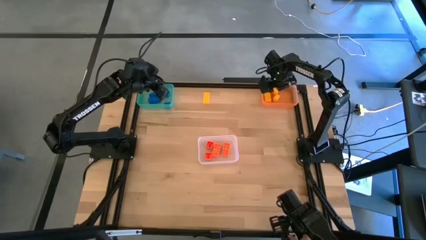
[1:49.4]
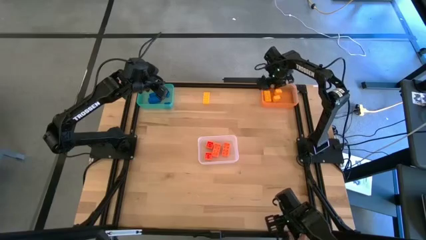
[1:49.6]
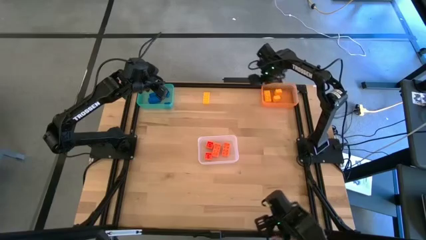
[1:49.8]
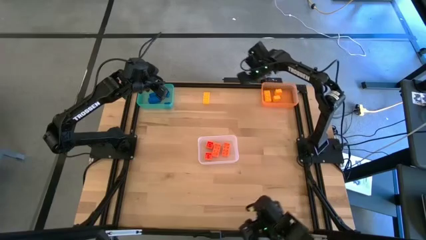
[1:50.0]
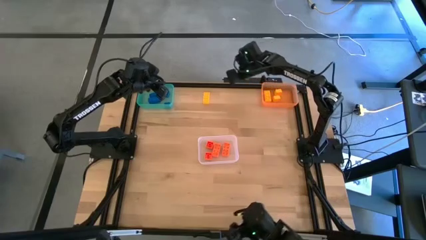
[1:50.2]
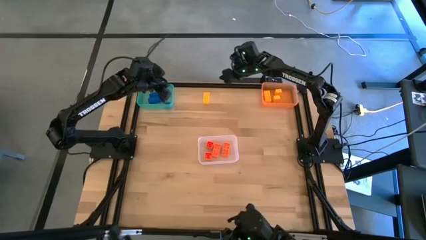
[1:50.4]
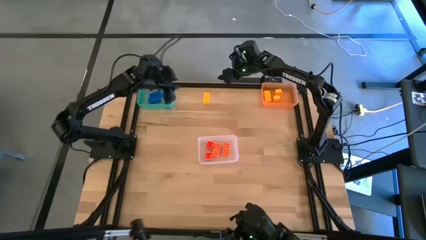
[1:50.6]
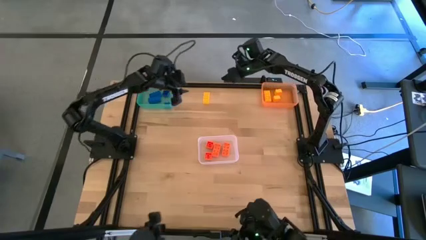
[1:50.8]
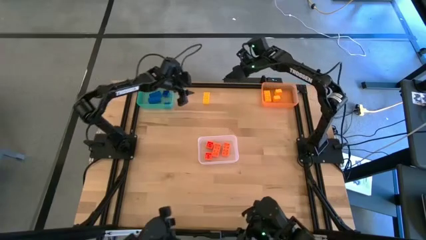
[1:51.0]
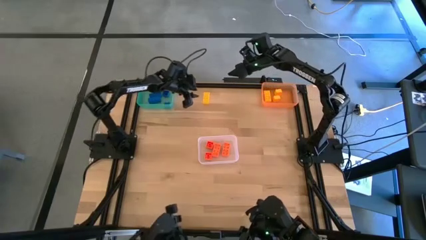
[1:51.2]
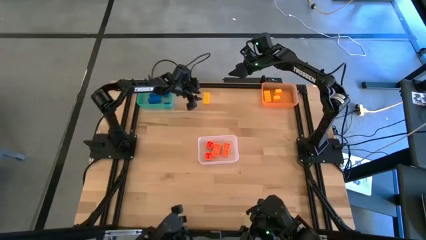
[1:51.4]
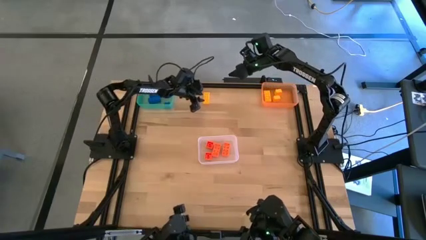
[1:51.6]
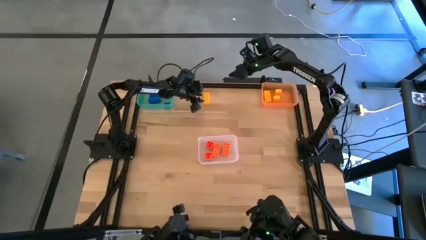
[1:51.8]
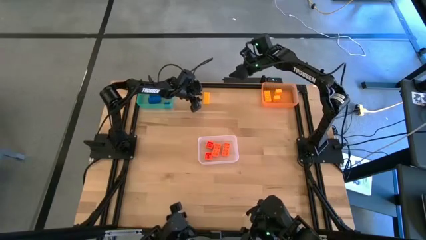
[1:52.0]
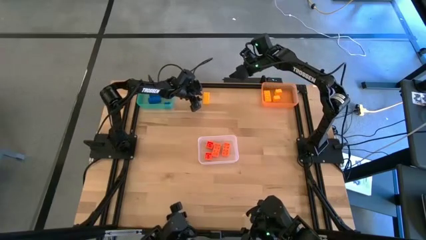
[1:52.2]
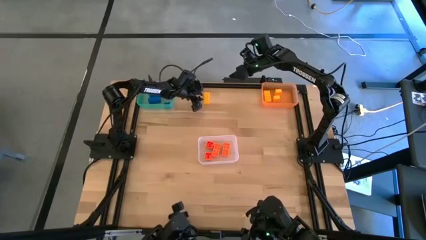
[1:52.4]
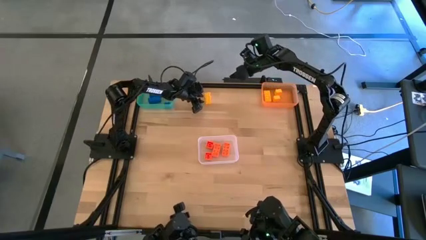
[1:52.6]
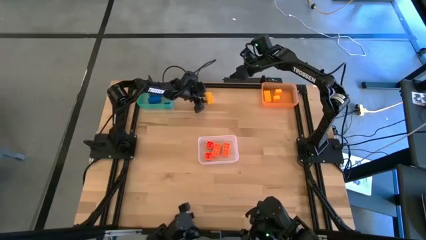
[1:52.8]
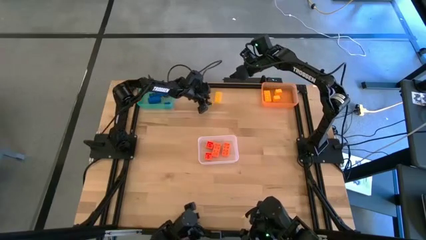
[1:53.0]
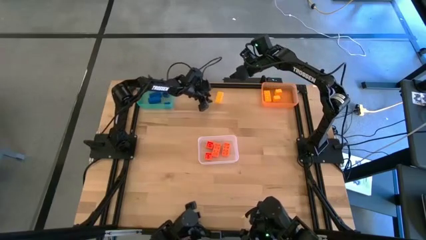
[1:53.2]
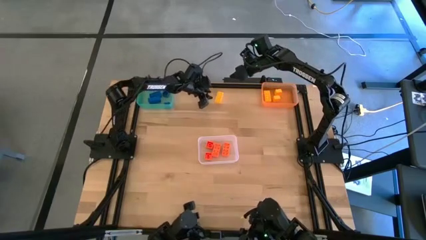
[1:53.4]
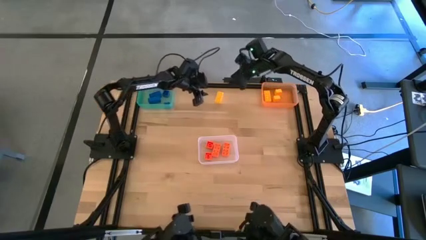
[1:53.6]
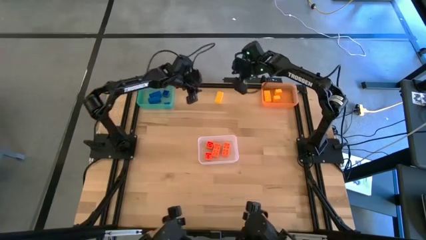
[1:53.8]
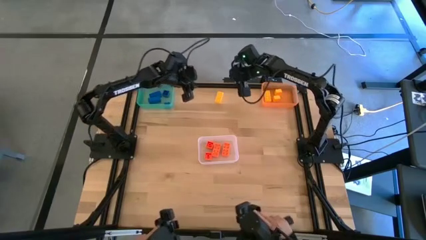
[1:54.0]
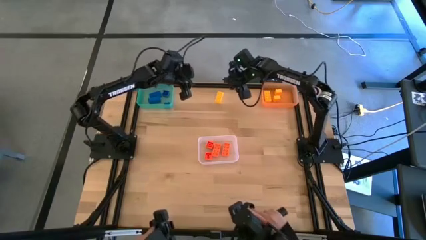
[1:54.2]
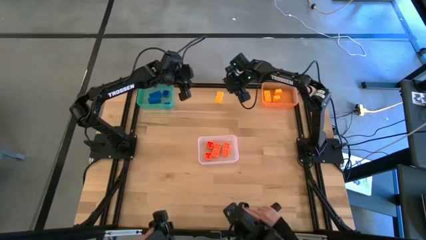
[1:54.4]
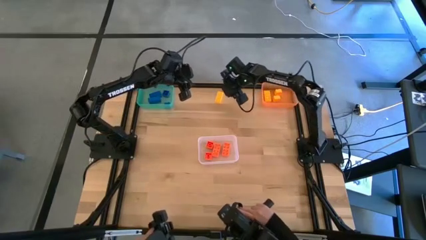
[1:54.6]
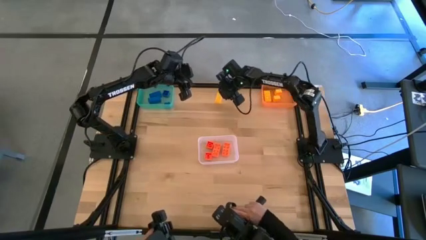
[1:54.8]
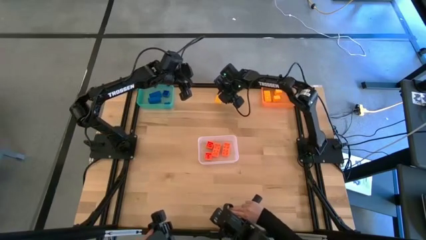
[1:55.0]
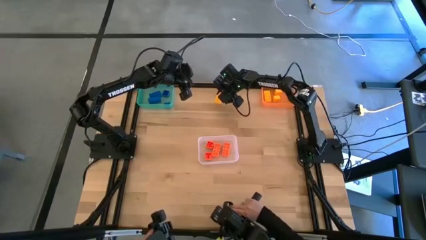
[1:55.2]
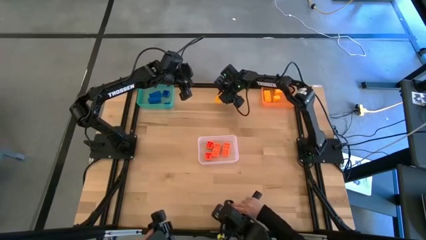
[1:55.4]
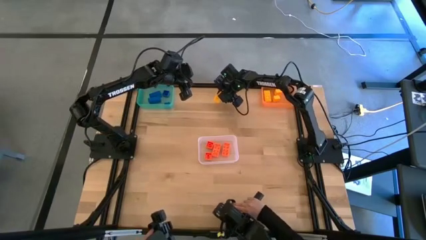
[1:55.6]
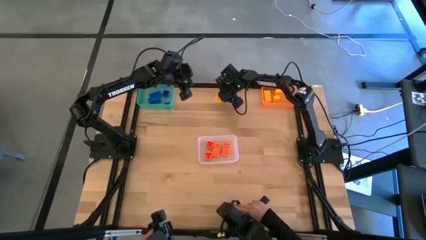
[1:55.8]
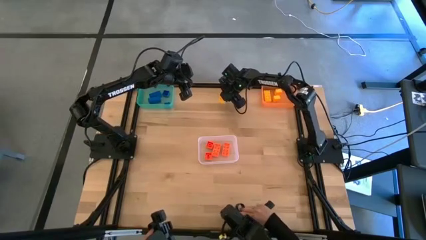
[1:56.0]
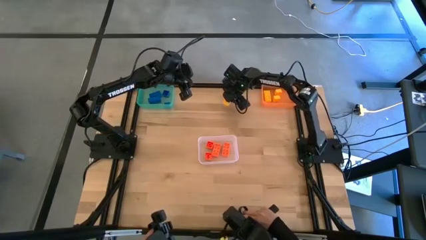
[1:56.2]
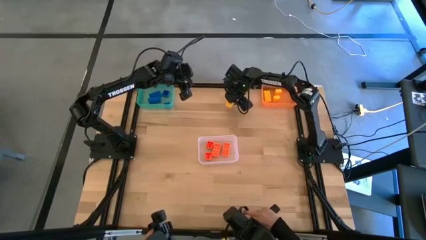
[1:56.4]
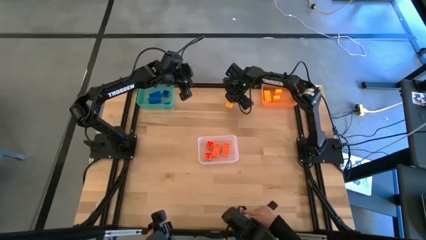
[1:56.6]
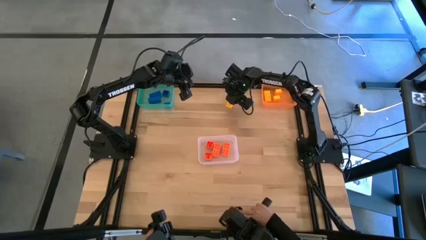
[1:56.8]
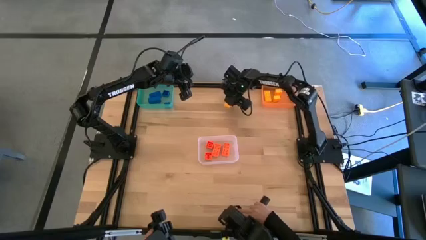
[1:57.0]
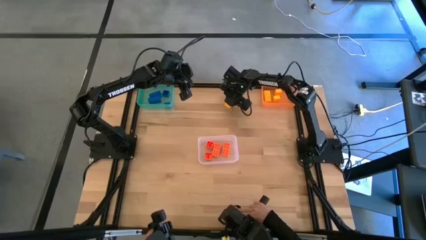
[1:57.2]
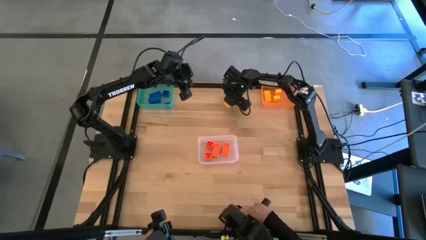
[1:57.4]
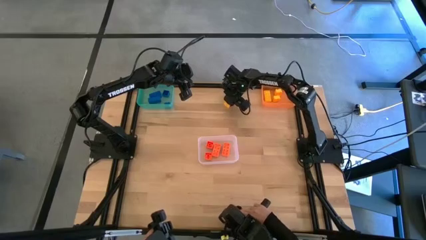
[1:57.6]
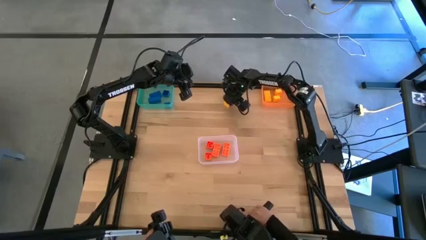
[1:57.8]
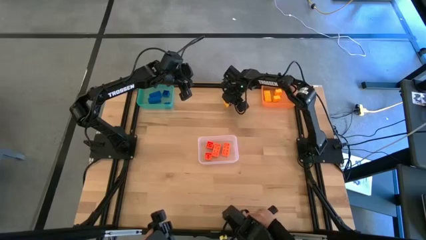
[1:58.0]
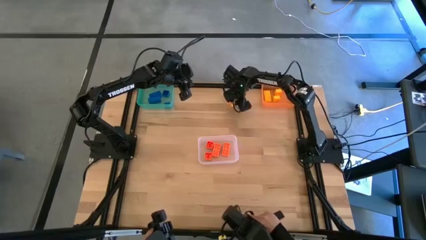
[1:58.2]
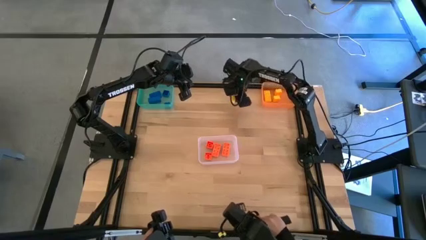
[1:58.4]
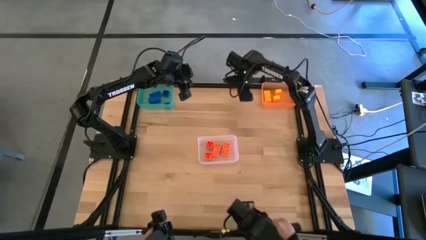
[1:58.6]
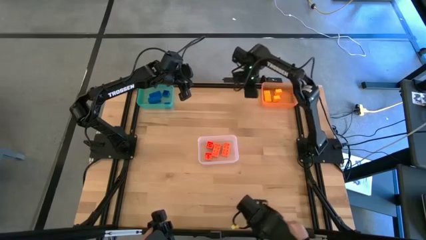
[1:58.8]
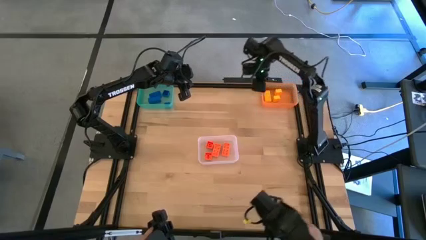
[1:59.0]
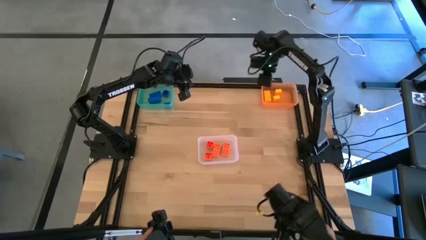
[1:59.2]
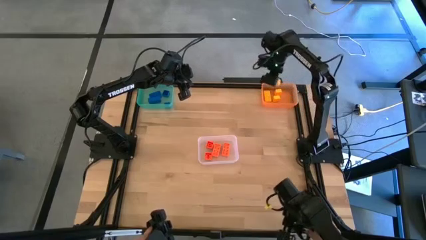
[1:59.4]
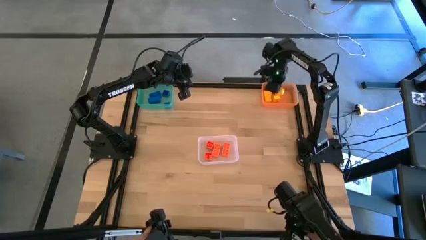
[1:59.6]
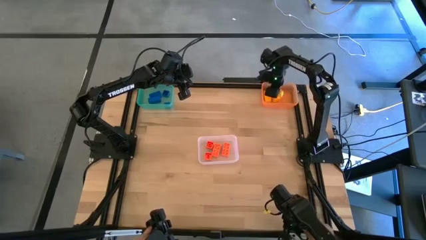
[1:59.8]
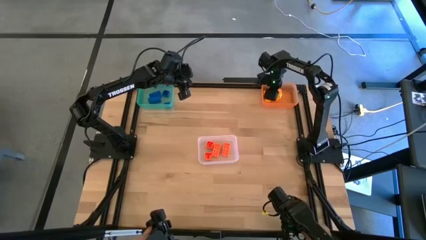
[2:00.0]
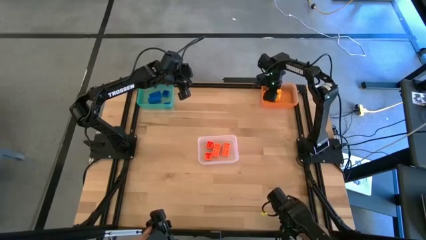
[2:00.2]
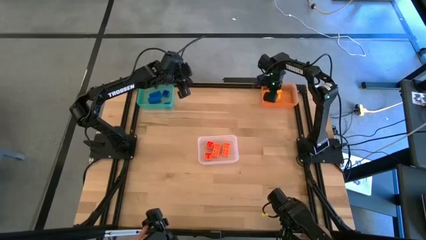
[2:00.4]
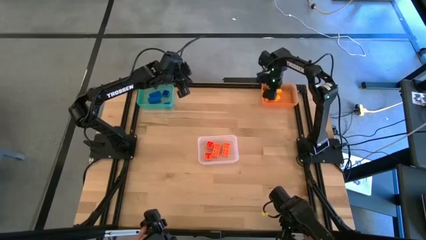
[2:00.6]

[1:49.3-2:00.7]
Task: Sort & place blocks by color
Put the yellow game piece into the orange bin

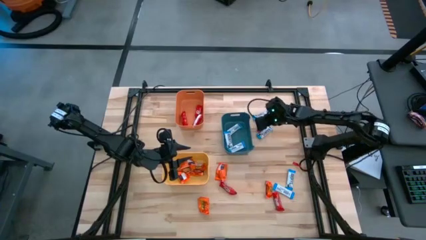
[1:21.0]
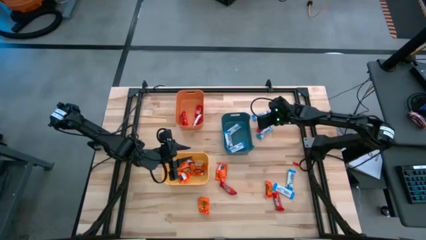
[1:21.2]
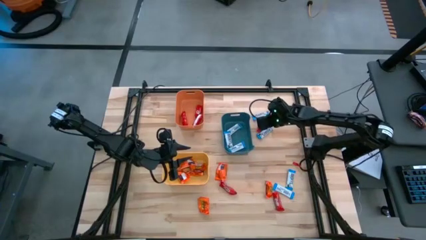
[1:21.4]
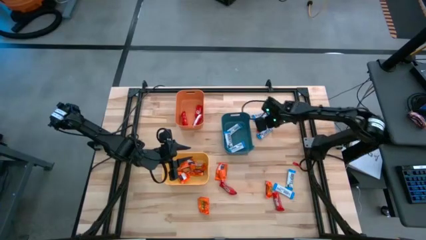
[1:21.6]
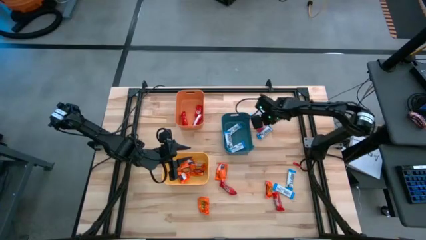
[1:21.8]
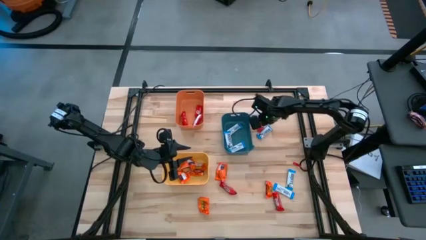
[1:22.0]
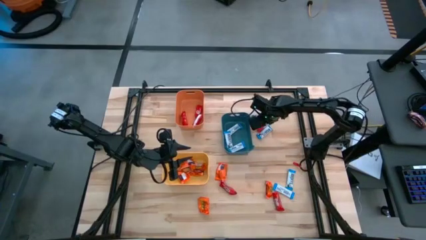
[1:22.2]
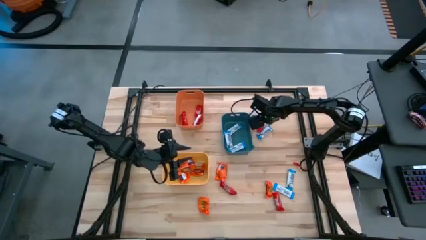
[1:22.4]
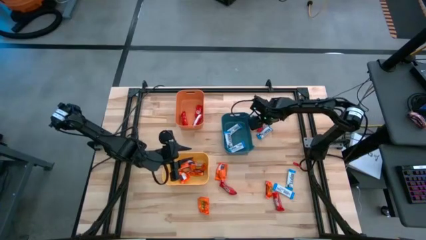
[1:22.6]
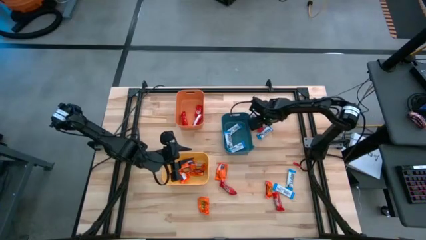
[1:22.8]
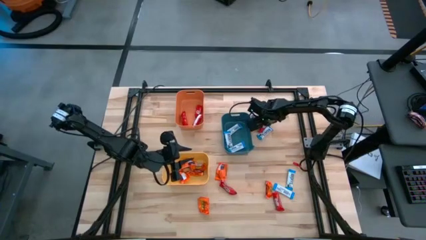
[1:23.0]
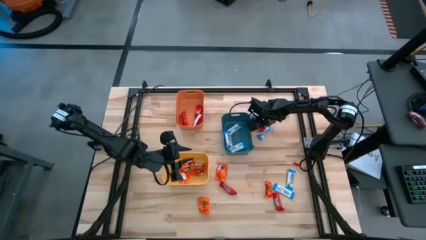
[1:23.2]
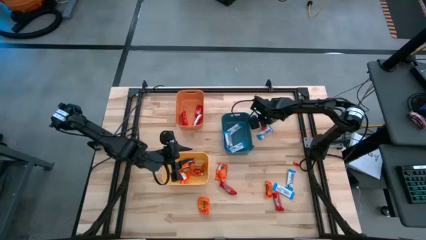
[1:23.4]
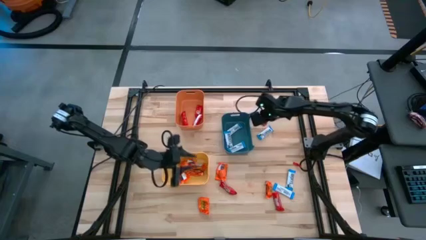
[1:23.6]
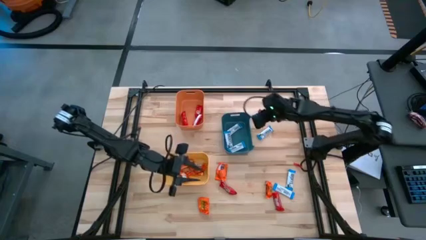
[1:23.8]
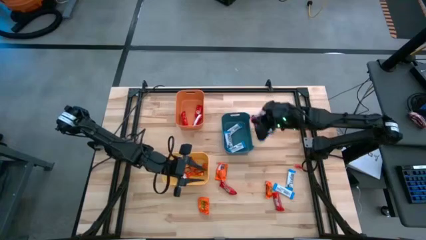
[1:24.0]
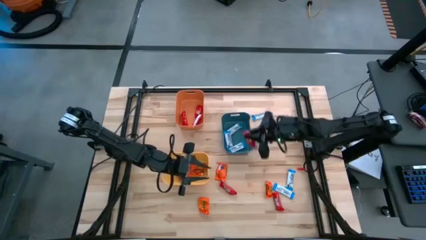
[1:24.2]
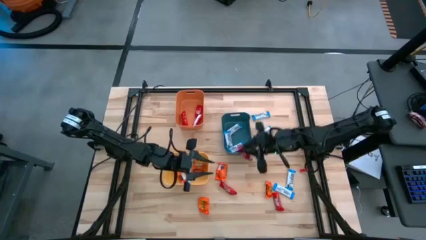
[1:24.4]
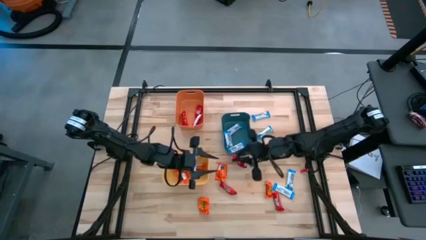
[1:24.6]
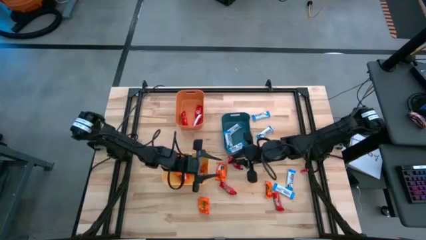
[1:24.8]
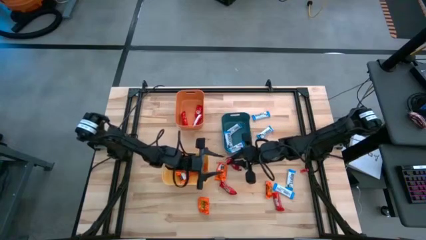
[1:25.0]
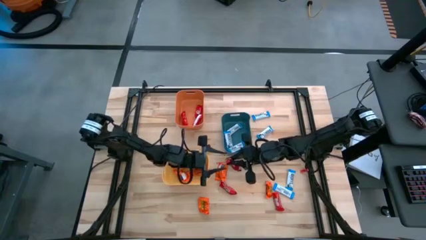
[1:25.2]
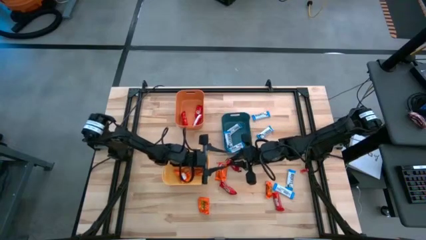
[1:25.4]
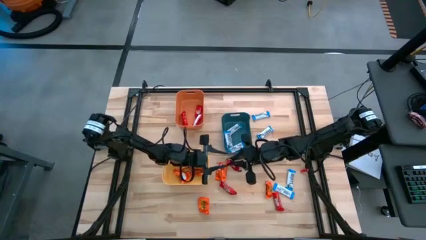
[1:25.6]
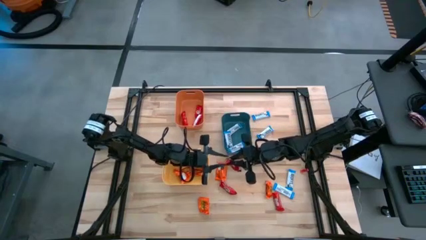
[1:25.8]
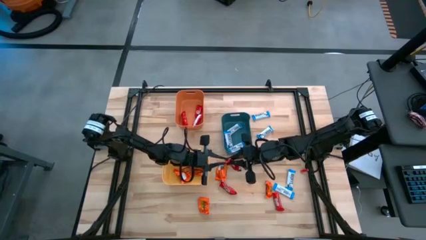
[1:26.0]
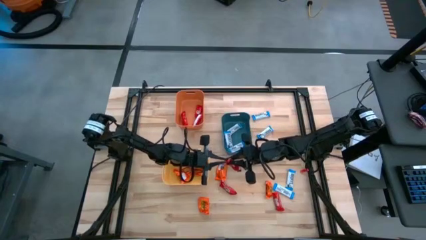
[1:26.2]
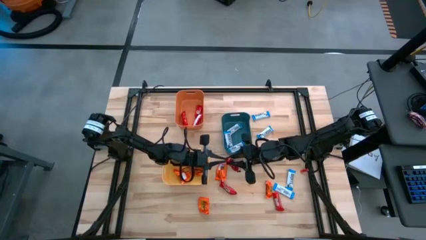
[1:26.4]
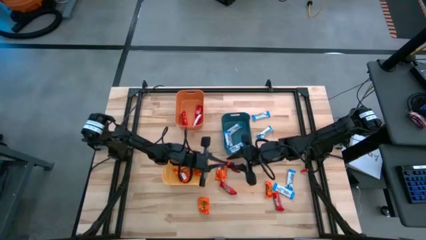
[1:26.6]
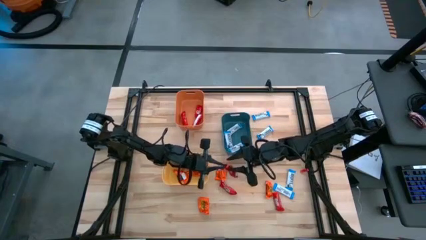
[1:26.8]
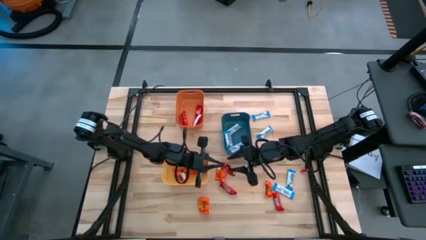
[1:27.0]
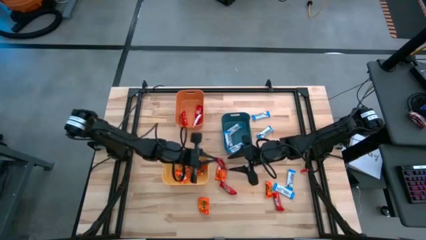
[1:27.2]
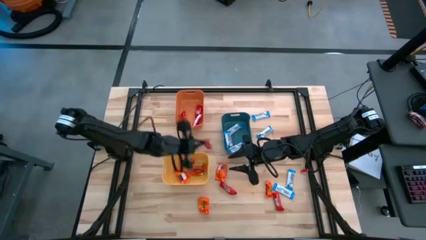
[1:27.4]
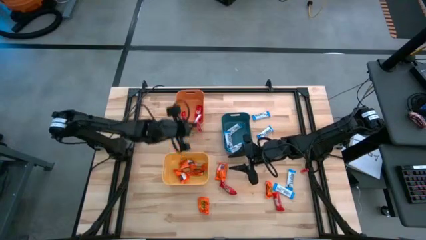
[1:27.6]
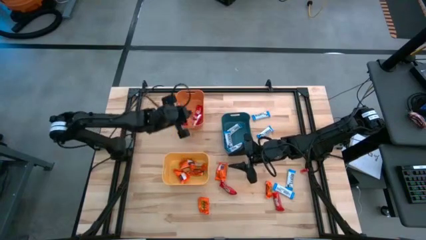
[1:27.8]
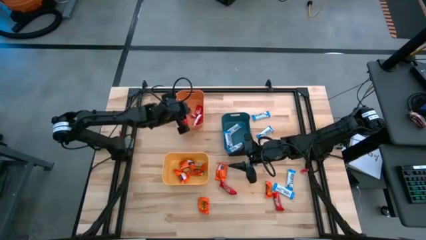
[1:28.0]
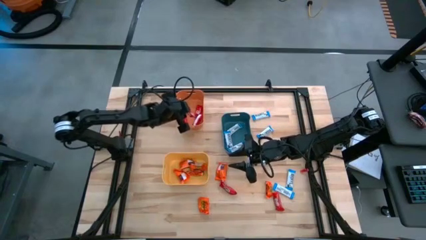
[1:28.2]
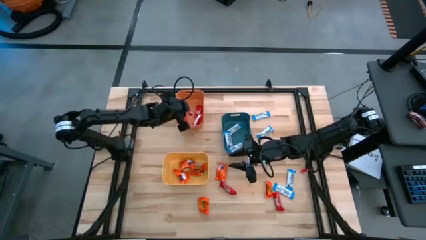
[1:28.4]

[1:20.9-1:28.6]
Task: Organize candy in baskets
Put the red chocolate into the orange bin
